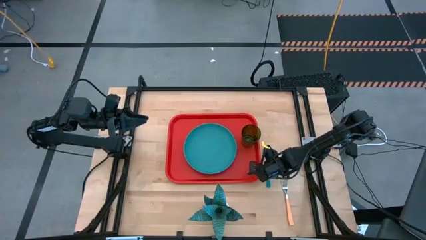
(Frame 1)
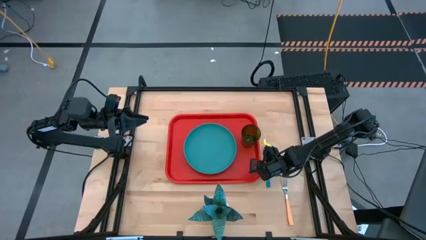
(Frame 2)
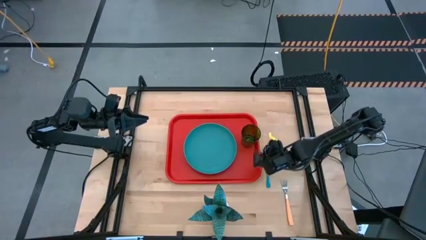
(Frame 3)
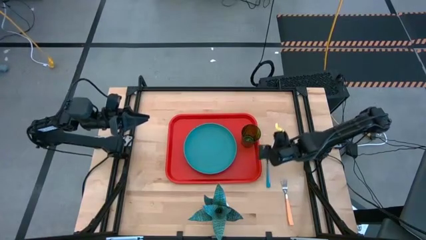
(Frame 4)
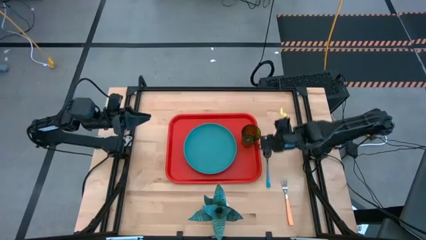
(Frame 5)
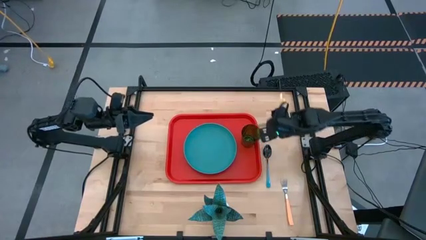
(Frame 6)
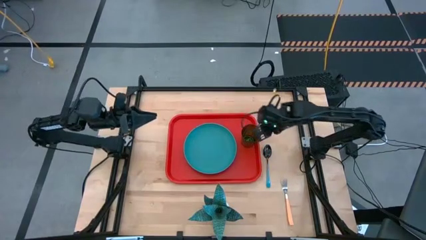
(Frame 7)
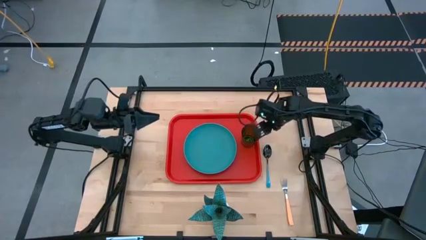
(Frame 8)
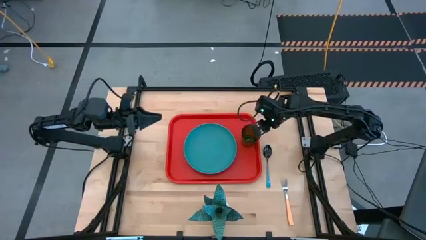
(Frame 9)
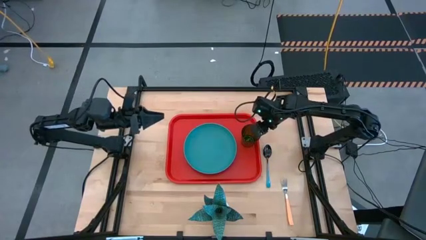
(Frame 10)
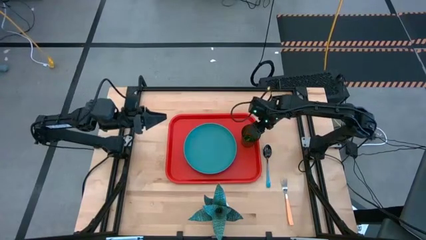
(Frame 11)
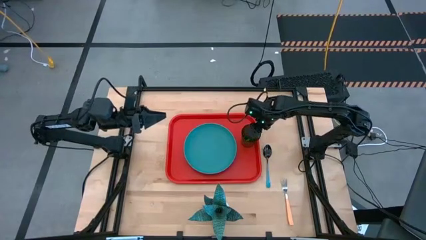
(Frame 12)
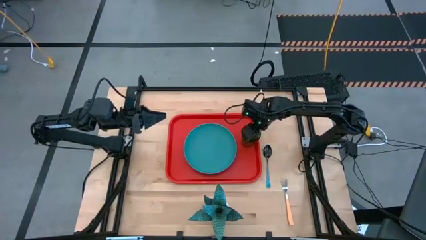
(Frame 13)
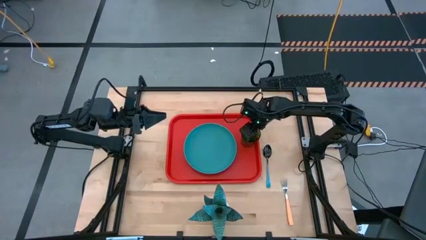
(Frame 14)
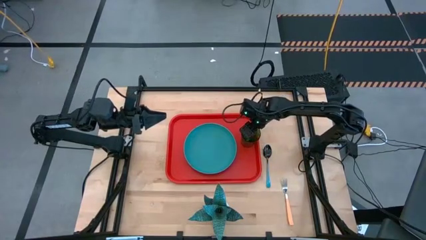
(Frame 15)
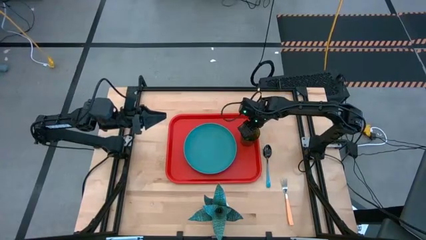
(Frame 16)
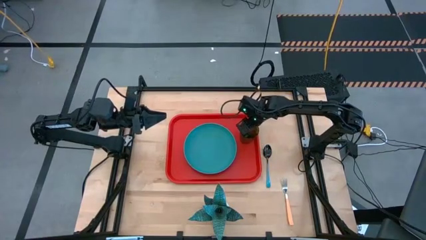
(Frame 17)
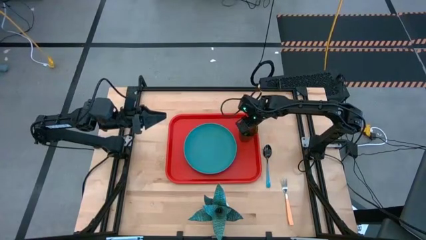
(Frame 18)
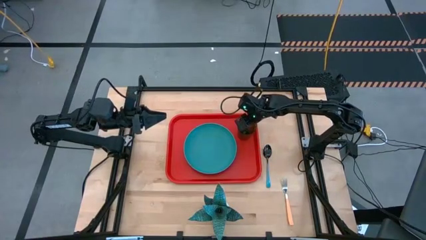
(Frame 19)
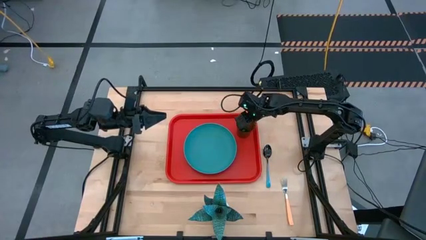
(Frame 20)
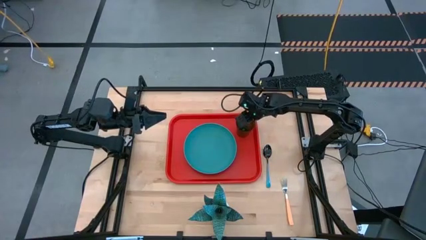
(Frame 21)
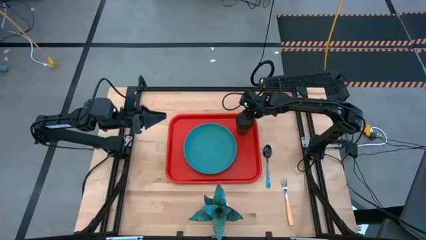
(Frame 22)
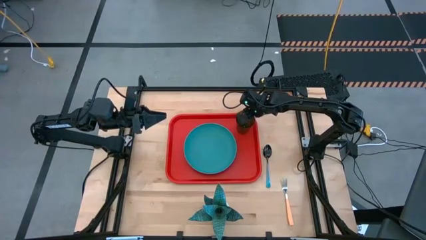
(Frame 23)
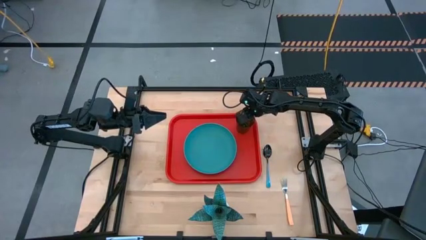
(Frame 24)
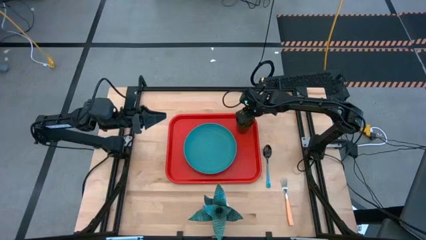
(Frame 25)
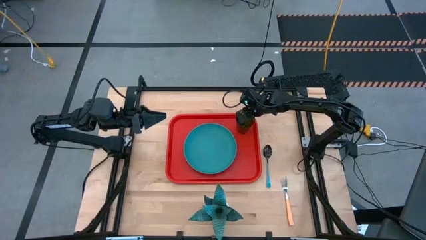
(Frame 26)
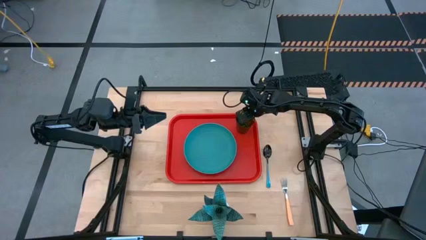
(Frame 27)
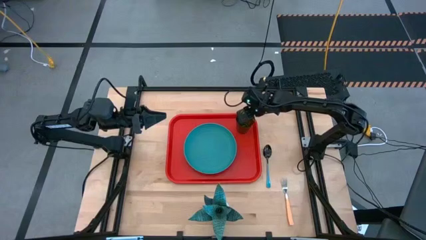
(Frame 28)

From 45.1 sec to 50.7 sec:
Task: Pick and place plate/cup/fork/spoon on tray
Adjust the green cup on the orange tray

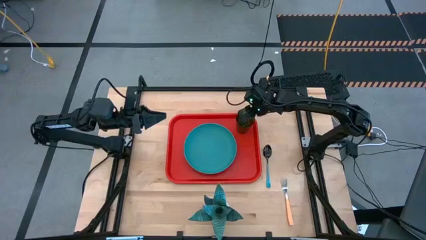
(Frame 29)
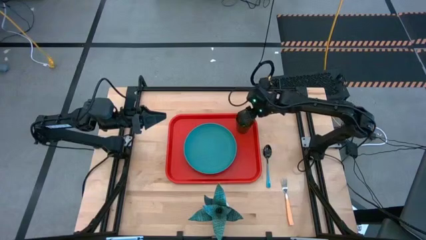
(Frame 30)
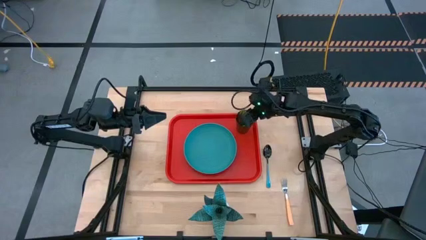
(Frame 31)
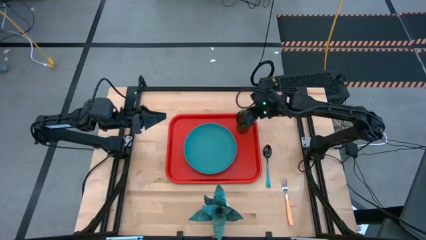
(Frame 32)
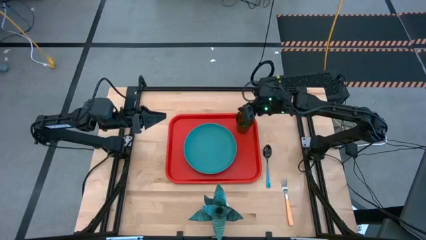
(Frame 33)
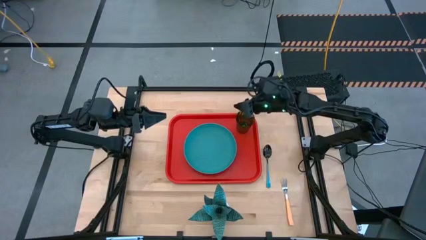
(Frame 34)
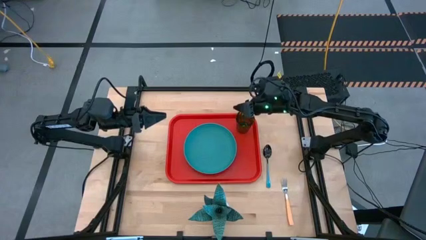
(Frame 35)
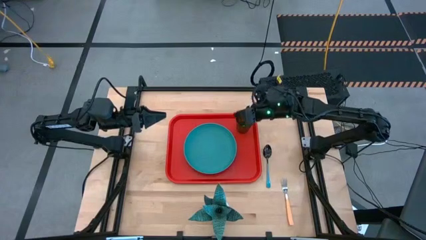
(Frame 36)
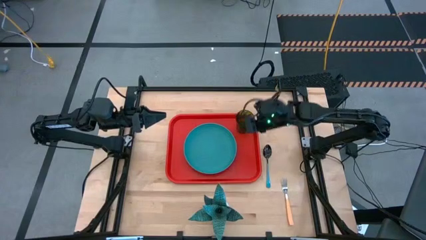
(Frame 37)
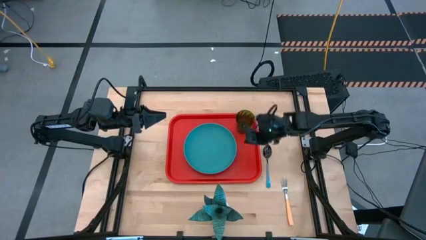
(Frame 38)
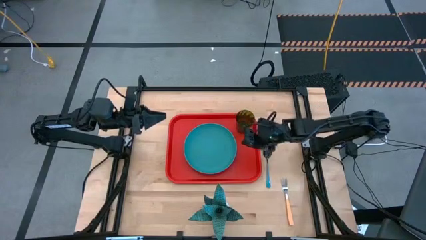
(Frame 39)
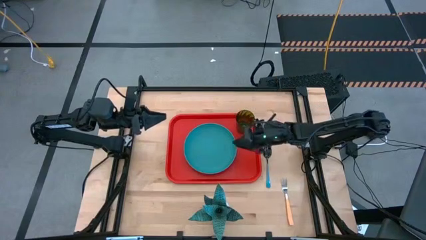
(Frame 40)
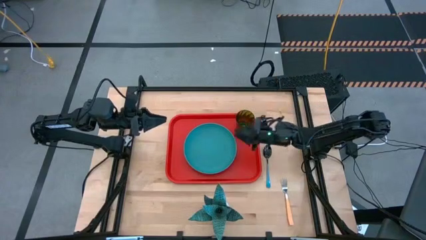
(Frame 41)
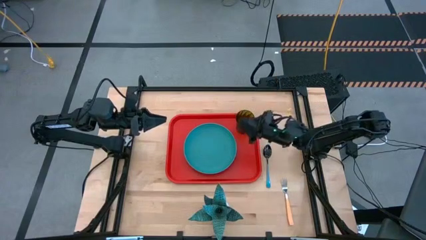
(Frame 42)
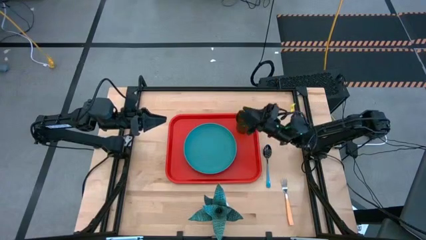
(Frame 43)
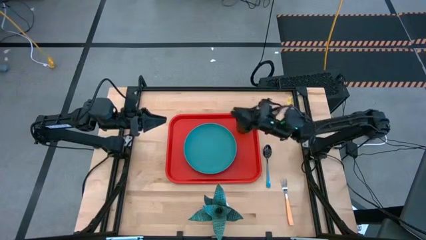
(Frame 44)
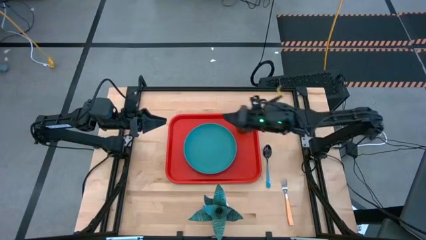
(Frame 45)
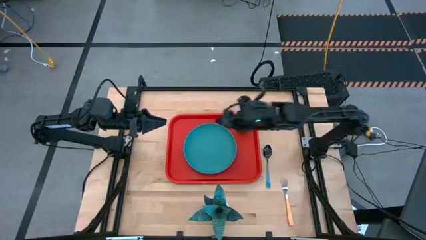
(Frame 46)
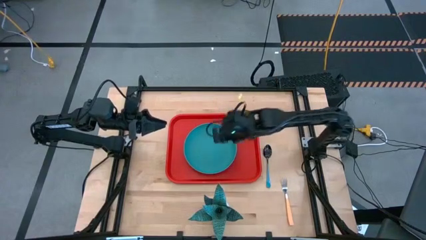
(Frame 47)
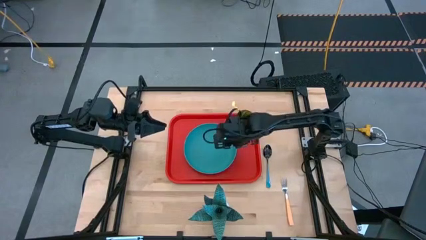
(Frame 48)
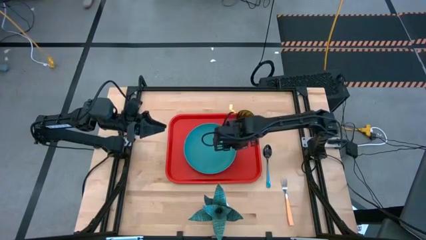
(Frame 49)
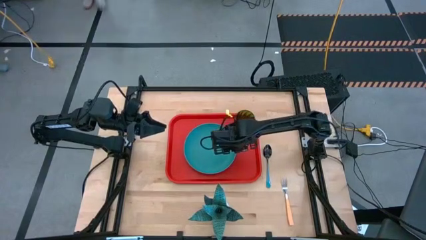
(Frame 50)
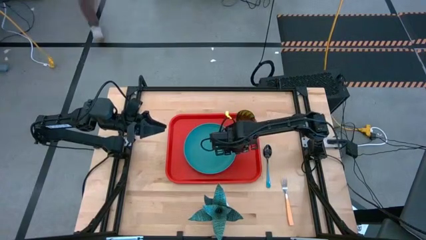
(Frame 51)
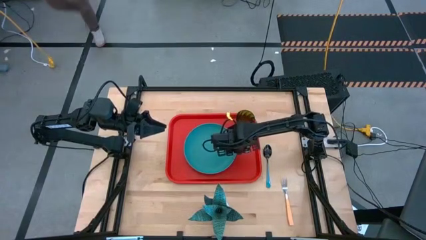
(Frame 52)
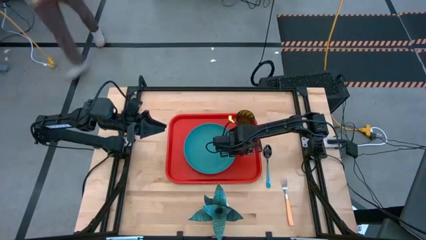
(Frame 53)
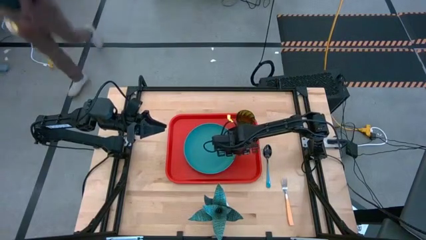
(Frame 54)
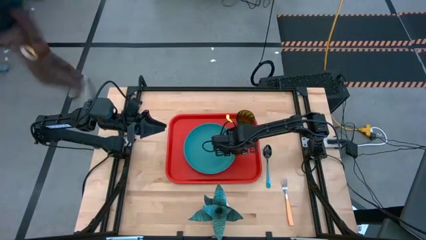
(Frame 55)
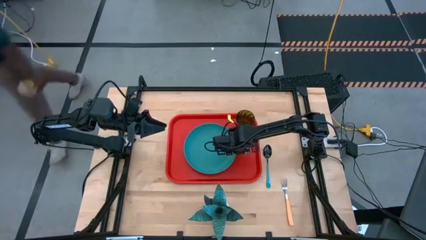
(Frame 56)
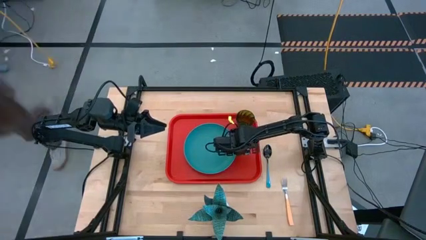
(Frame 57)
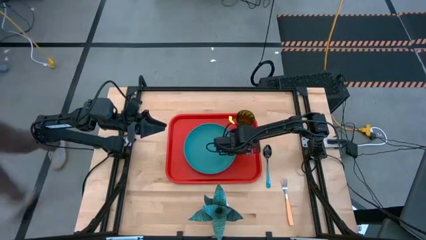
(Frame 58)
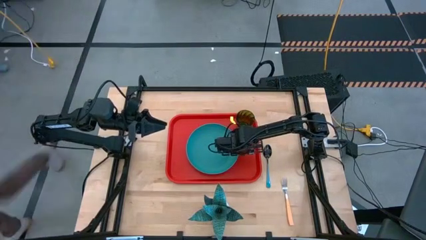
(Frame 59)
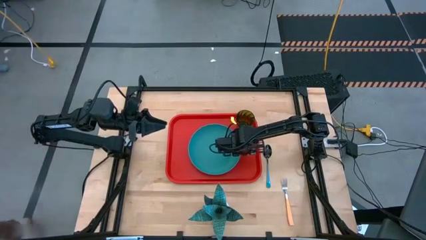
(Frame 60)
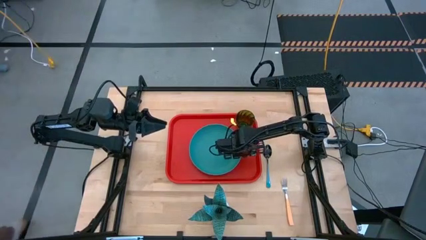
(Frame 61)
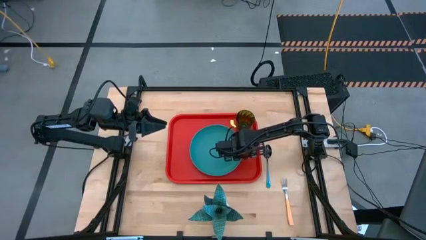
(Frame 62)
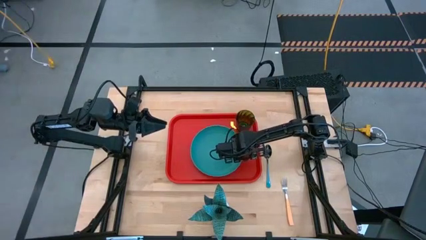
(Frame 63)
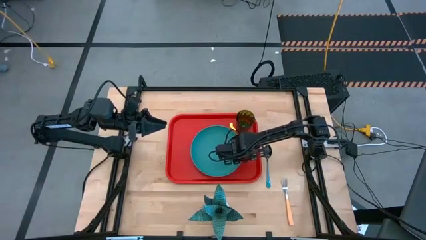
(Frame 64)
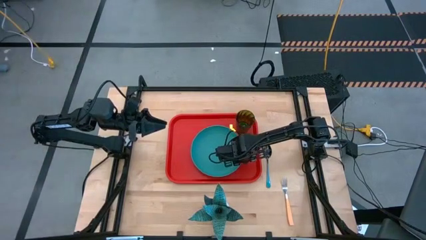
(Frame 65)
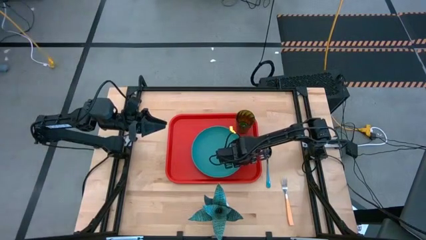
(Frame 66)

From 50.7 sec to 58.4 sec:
Adjust the green plate on the orange tray

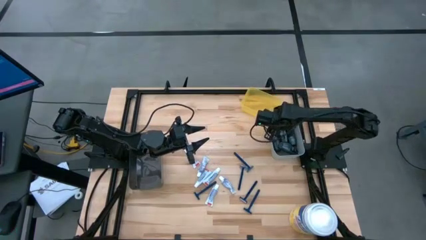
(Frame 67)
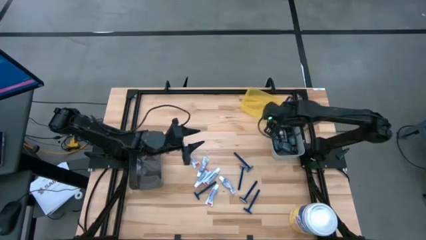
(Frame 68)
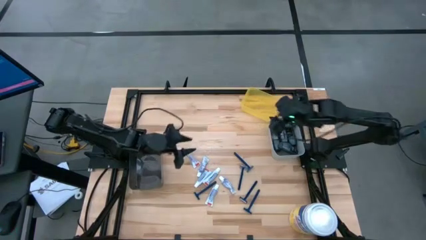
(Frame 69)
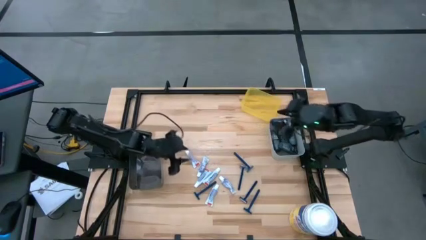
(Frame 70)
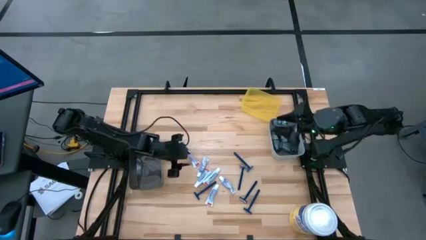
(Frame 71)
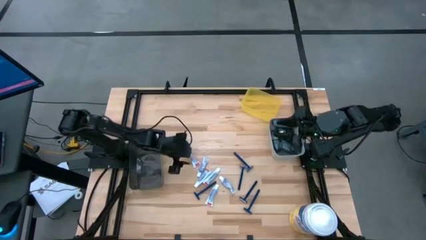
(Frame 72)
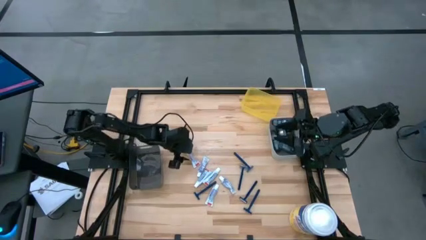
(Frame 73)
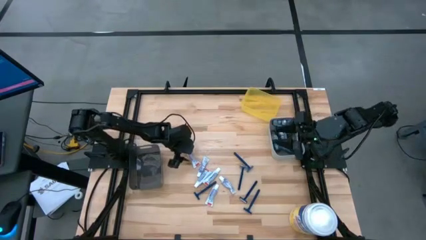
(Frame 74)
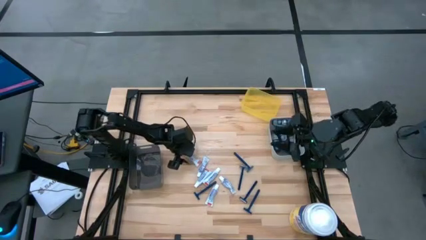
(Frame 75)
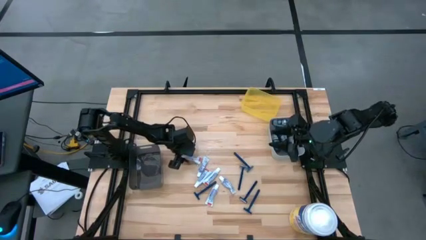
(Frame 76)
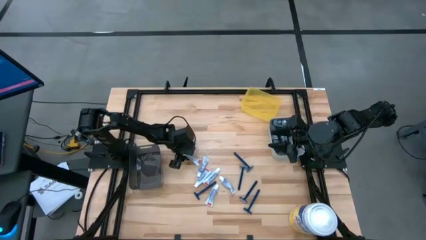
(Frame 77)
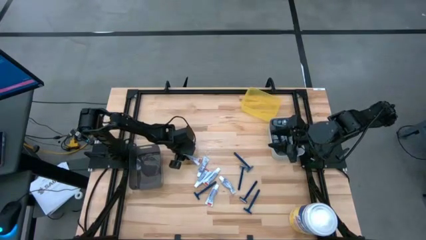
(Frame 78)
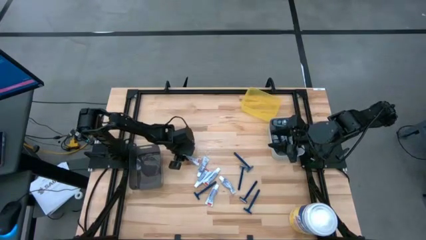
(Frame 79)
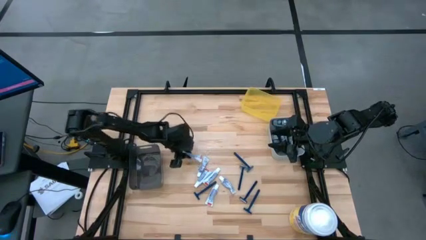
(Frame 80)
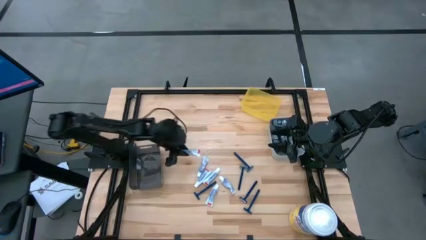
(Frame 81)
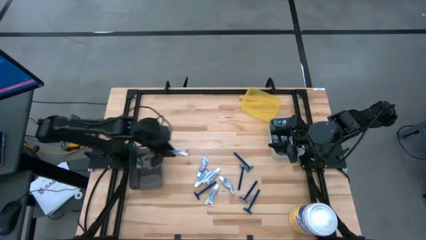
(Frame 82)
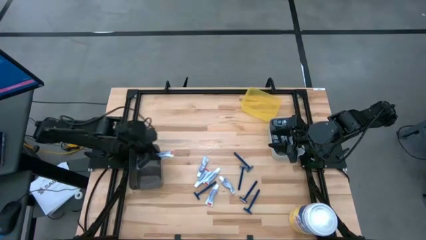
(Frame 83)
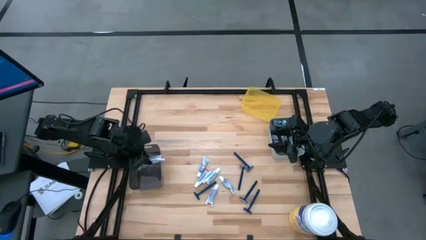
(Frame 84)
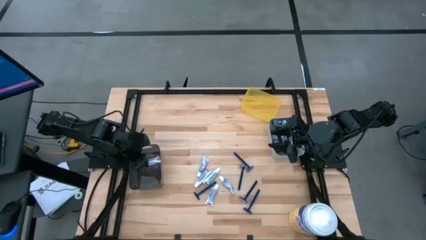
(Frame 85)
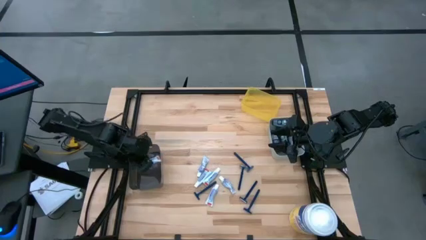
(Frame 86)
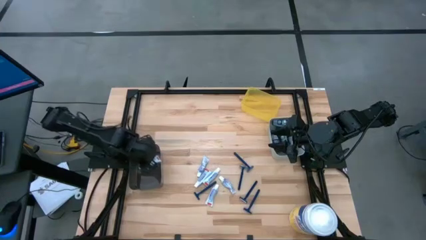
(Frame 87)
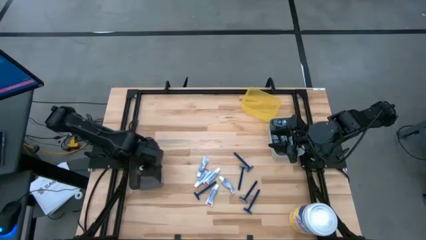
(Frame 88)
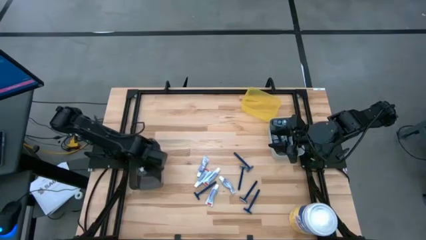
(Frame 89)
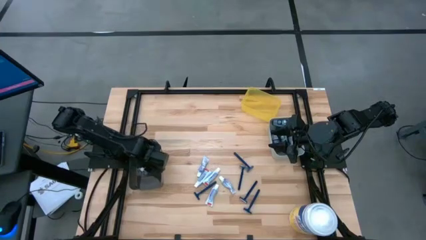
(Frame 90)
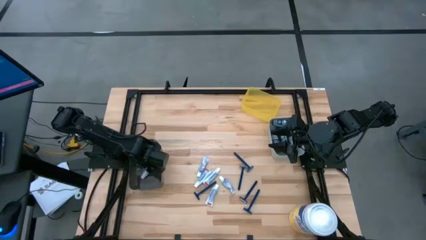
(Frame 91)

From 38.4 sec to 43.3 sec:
Task: Pick & Place Travel size toiletries
Put the white toothpaste into the black bin
